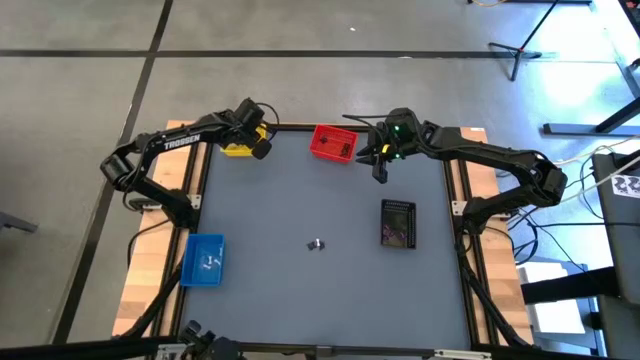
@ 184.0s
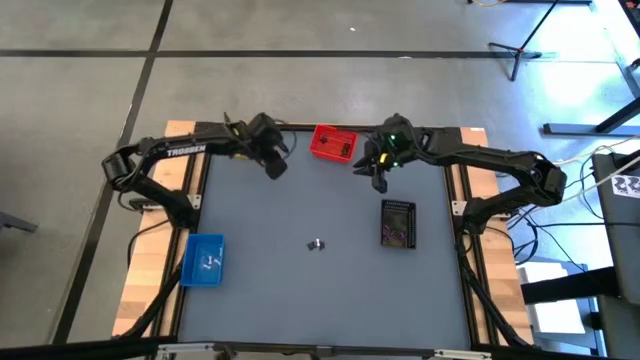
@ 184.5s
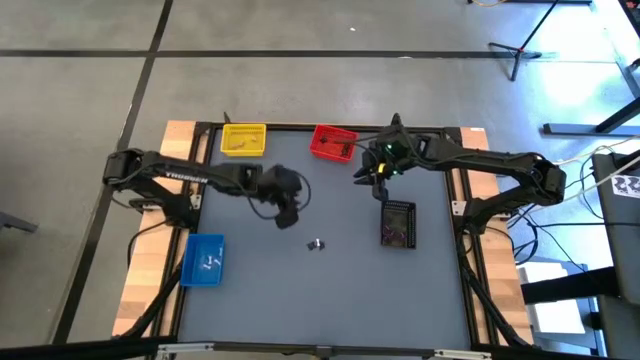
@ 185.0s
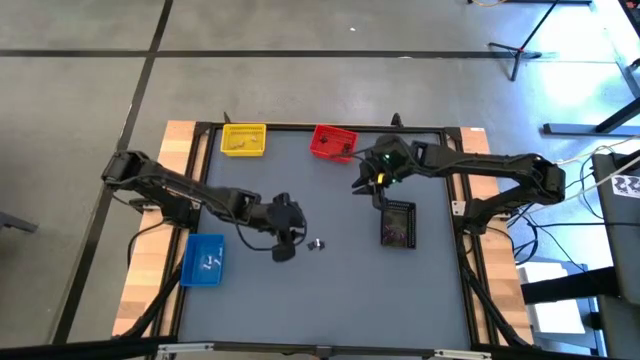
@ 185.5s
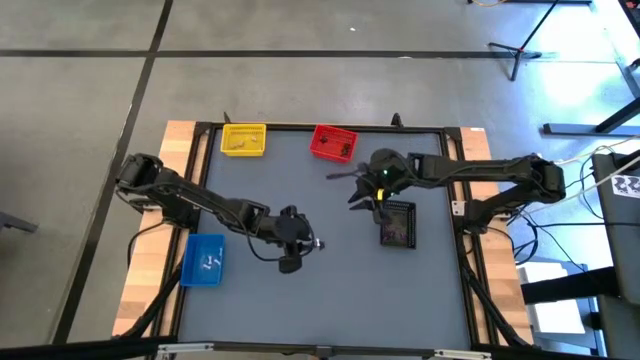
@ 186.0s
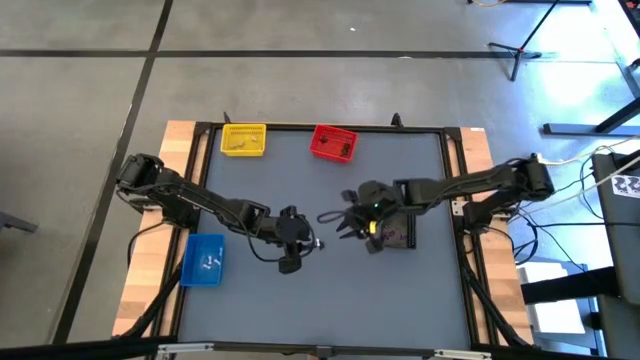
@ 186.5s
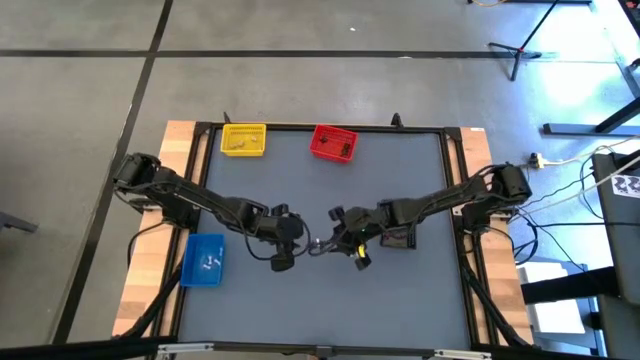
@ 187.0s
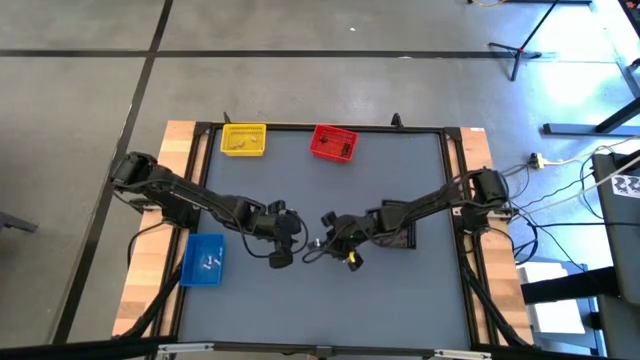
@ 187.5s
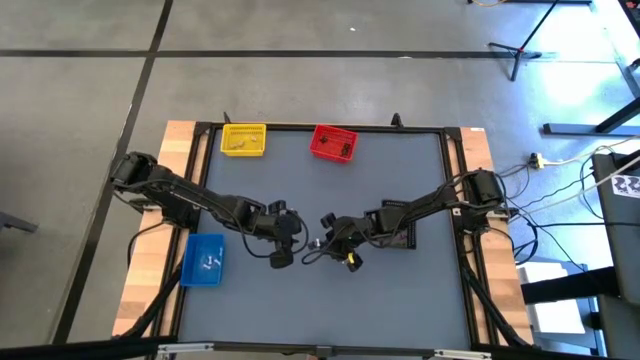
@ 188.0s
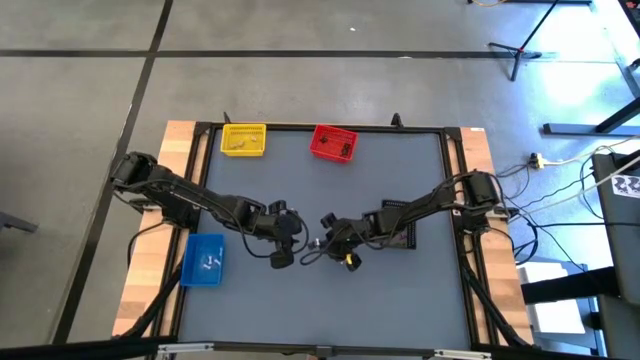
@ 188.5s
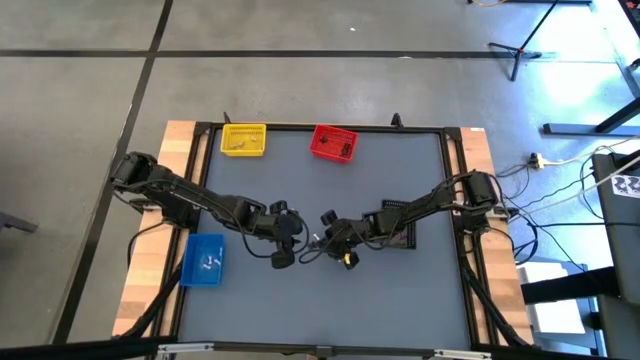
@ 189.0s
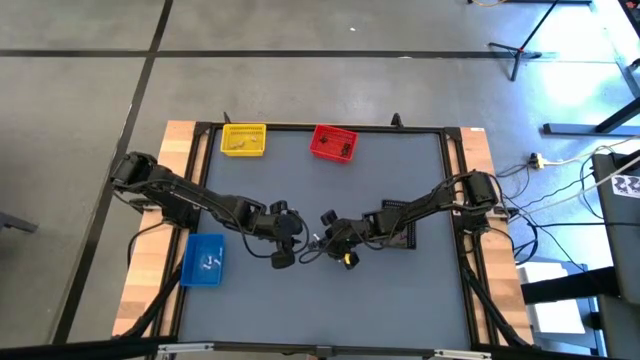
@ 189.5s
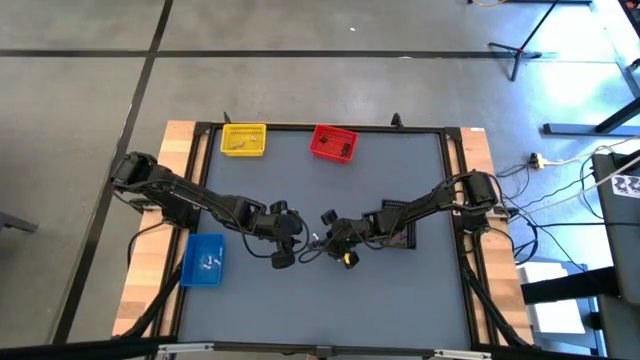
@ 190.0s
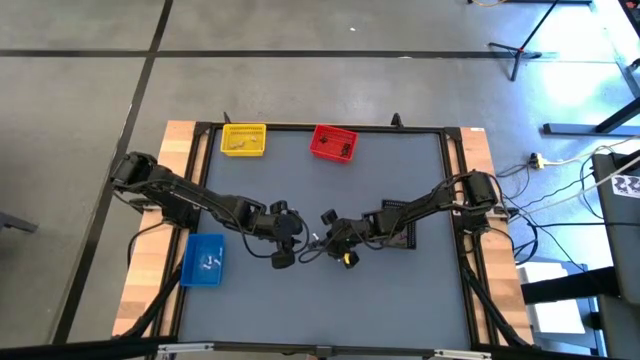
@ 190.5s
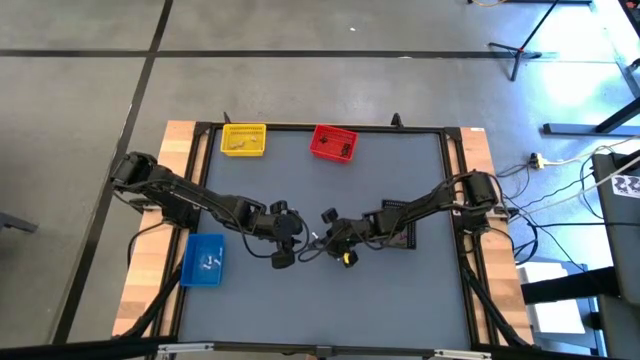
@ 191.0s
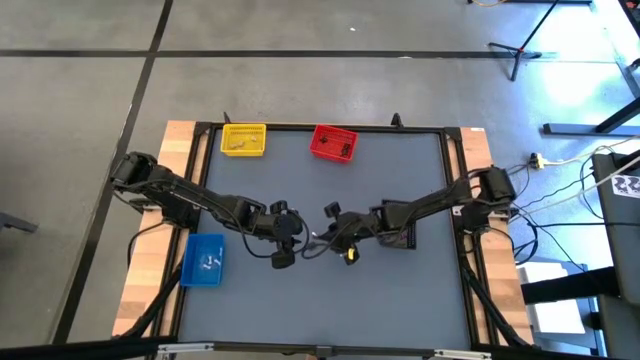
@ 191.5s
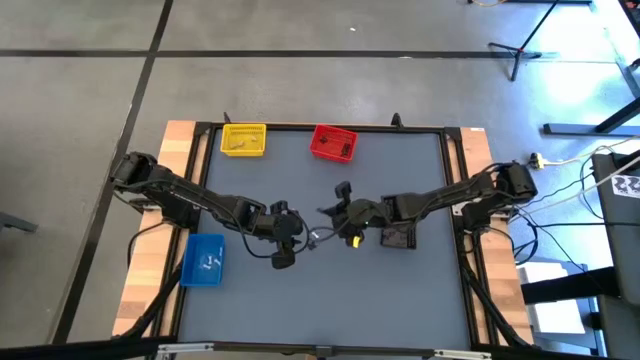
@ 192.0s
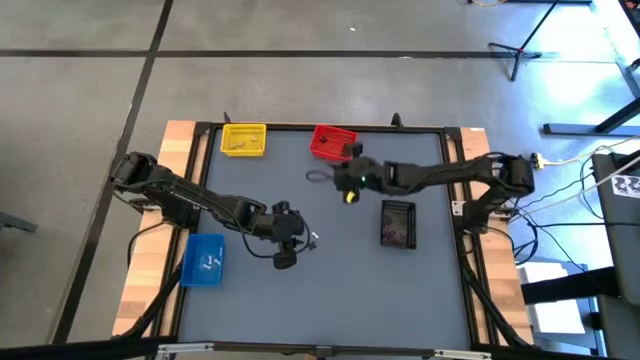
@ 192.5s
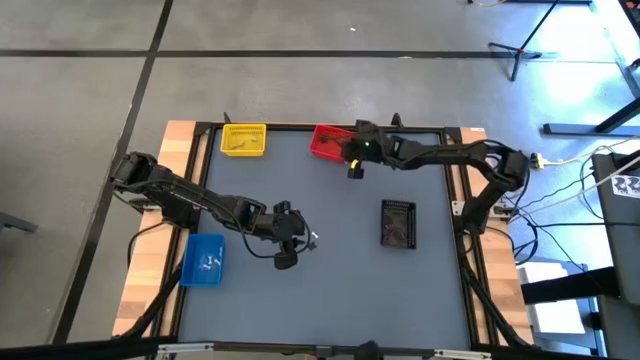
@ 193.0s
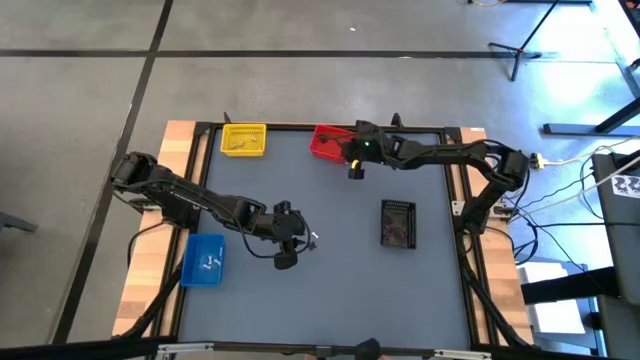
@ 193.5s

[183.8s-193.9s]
Task: Sort Halloween decoration
Put the black spider toy into the red bin

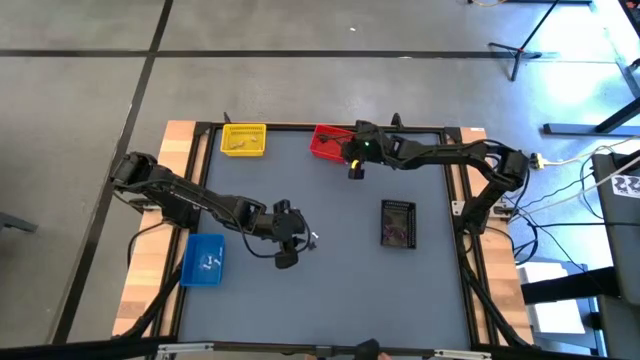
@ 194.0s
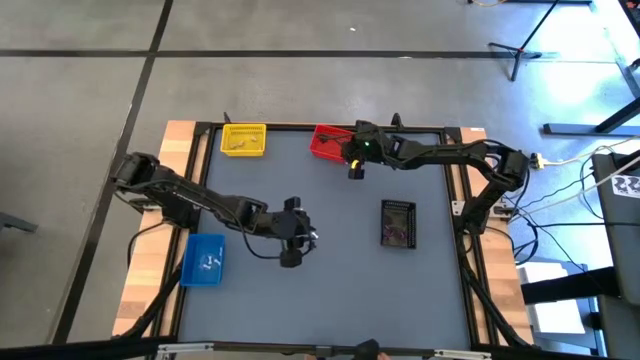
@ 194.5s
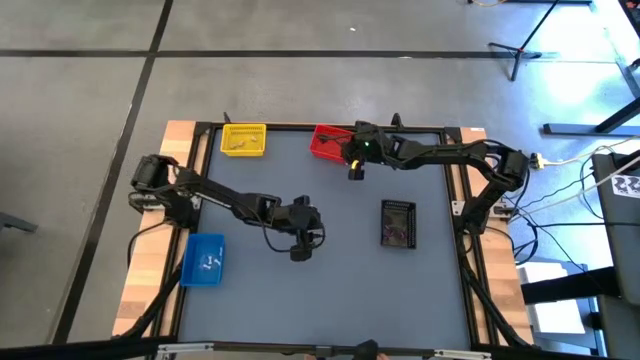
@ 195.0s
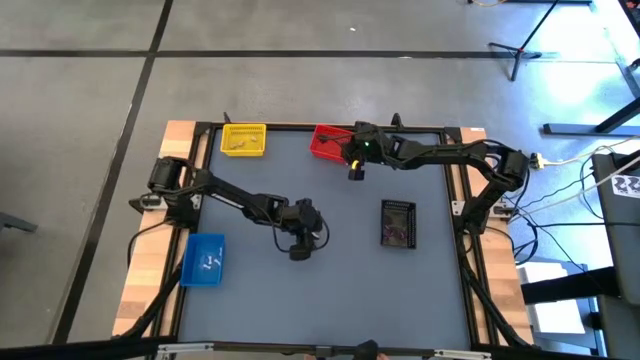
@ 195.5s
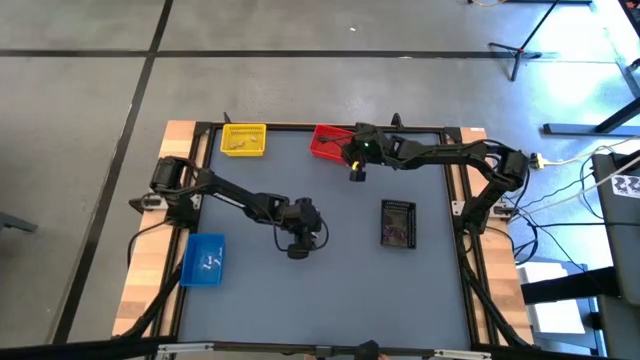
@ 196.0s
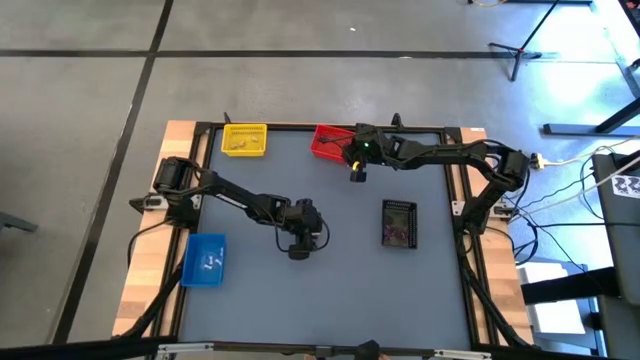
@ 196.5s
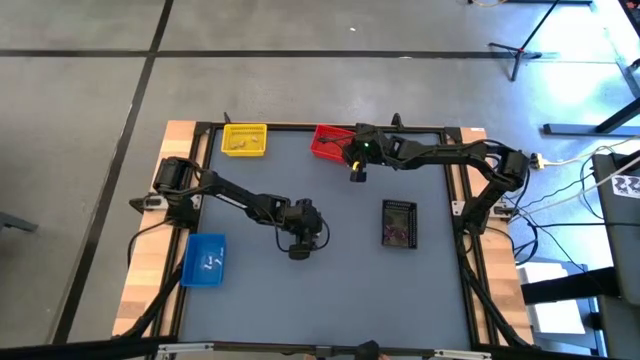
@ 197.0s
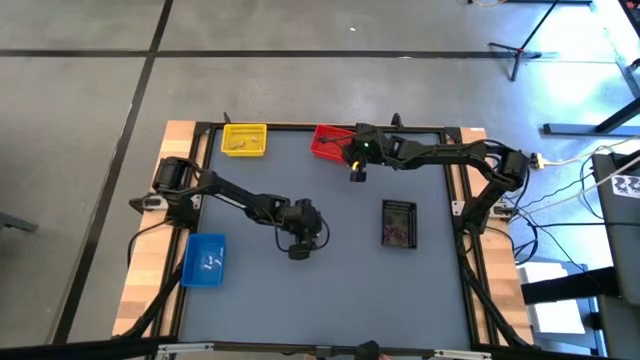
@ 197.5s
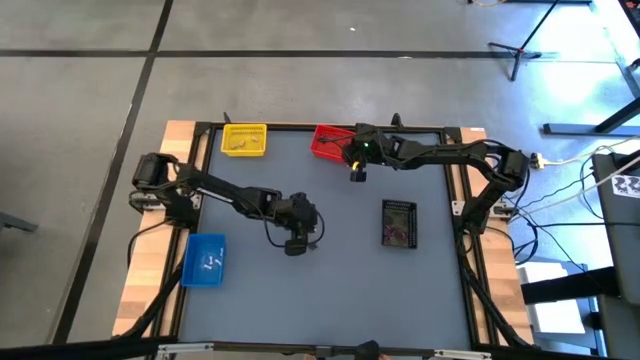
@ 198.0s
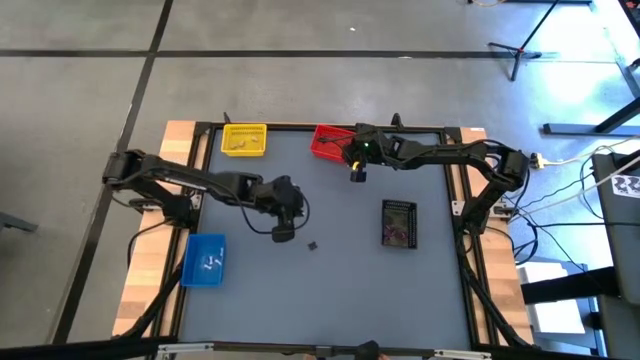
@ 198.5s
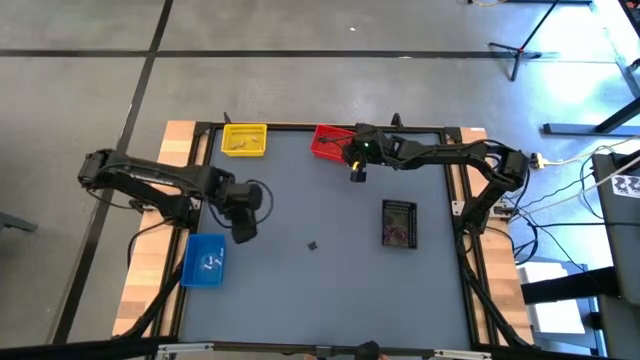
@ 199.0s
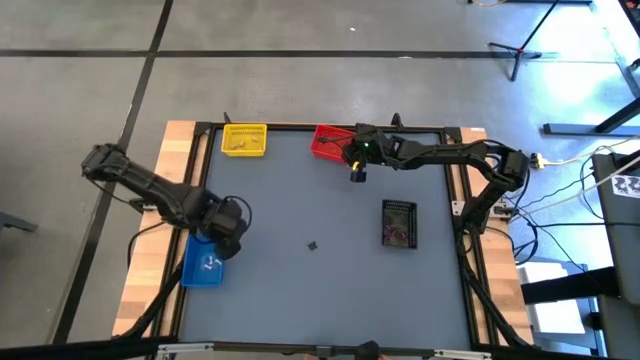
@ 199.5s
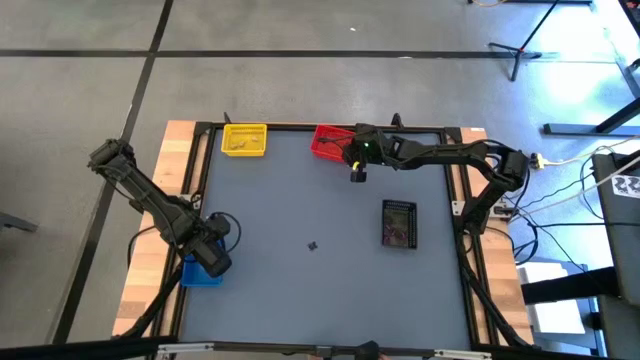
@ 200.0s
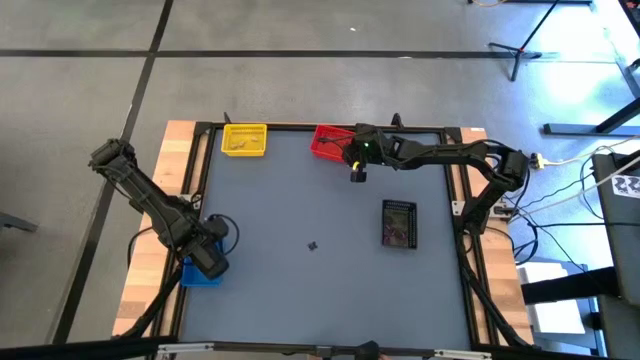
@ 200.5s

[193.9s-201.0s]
Put the white bone toy into the blue bin

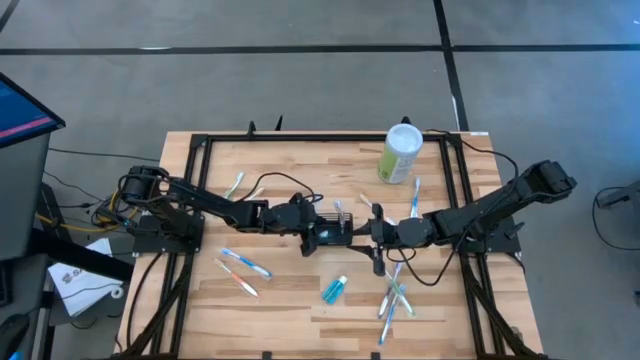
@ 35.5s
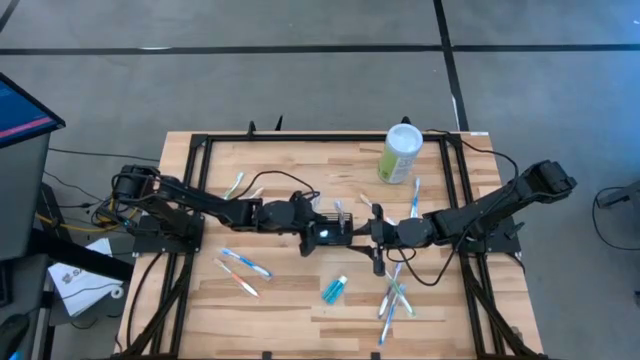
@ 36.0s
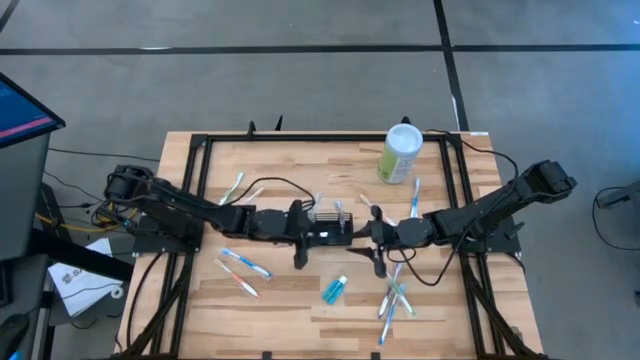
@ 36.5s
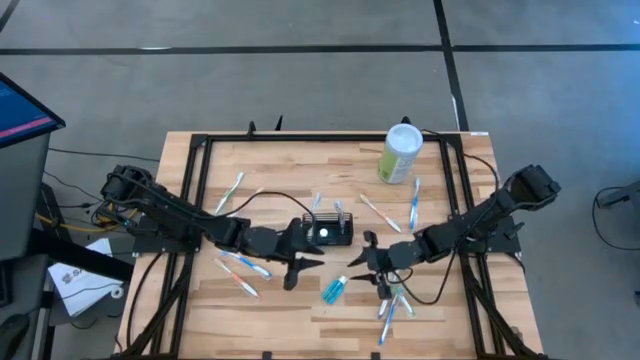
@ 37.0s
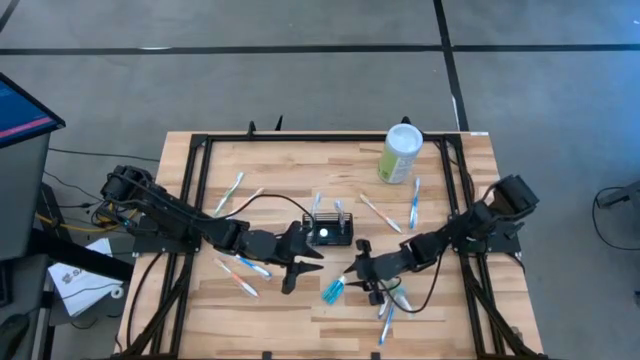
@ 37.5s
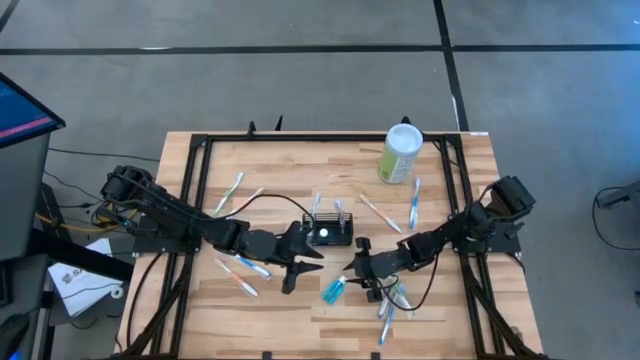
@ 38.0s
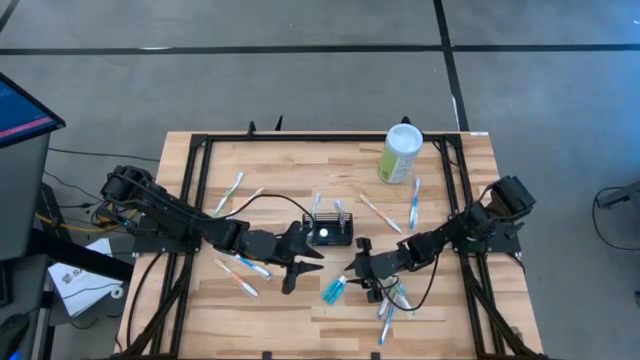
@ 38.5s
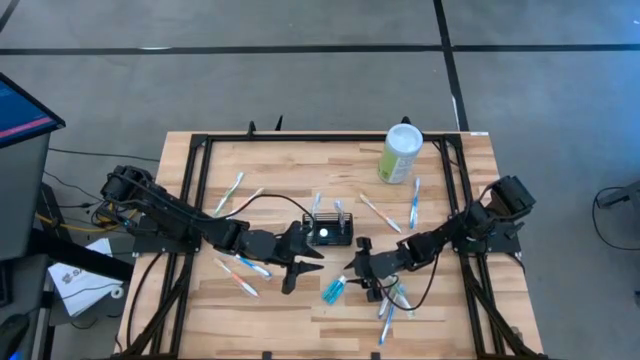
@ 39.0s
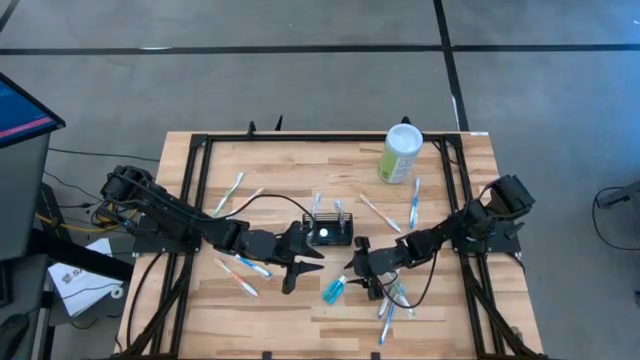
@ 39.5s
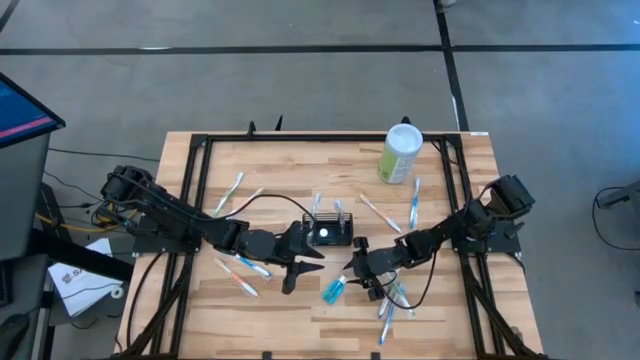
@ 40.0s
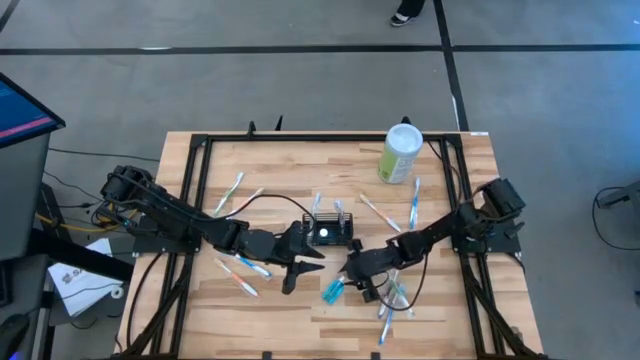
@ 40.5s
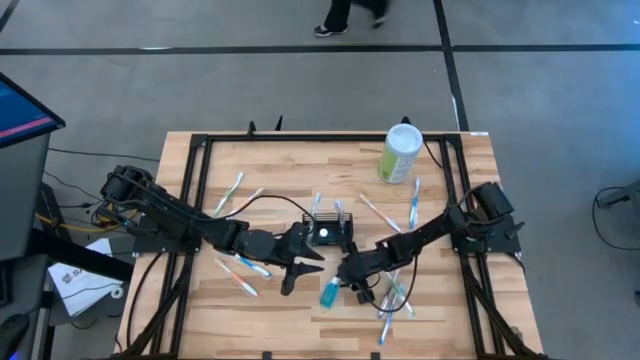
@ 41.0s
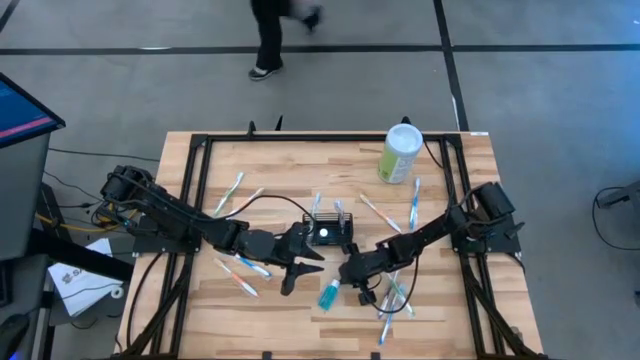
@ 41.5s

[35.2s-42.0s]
Task: Pick & Place toothbrushing station
Put the mouthwash bottle into the middle compartment of the organizer
